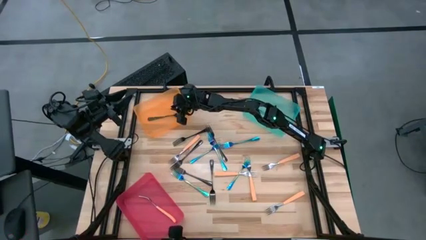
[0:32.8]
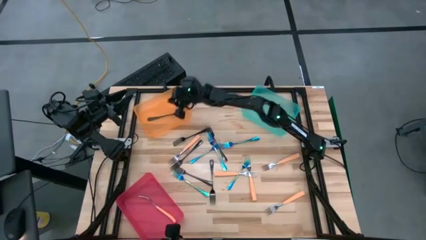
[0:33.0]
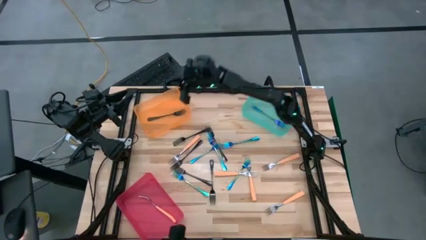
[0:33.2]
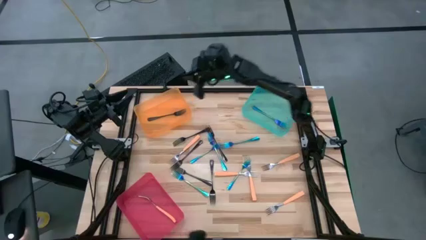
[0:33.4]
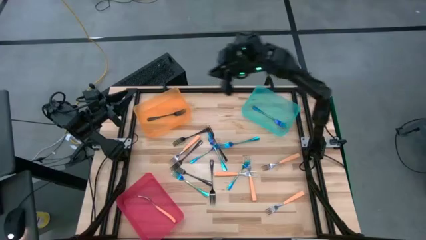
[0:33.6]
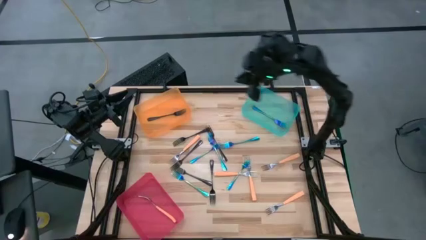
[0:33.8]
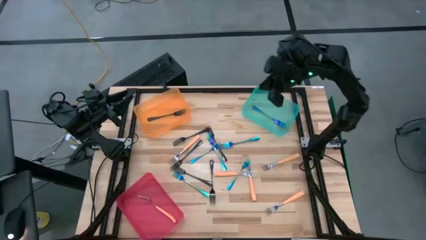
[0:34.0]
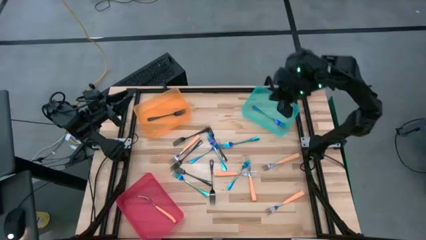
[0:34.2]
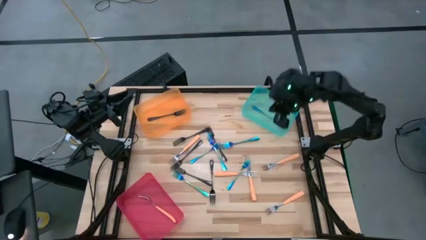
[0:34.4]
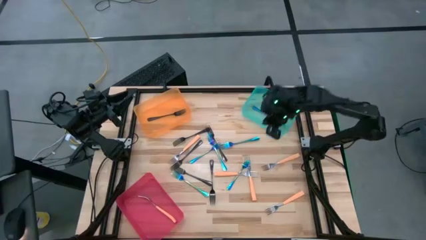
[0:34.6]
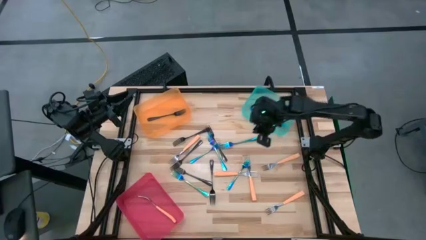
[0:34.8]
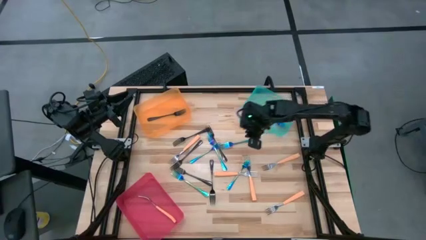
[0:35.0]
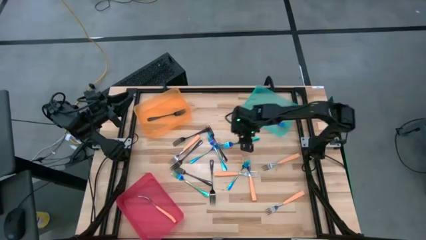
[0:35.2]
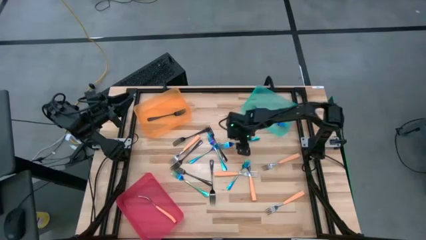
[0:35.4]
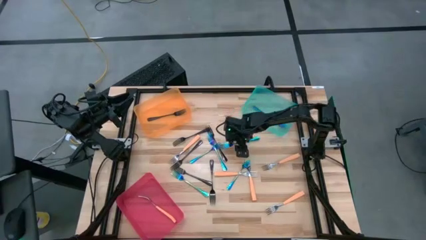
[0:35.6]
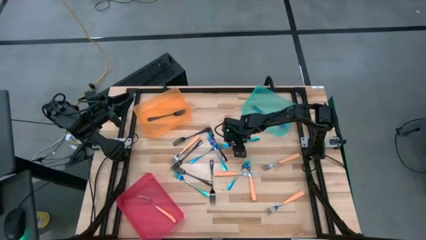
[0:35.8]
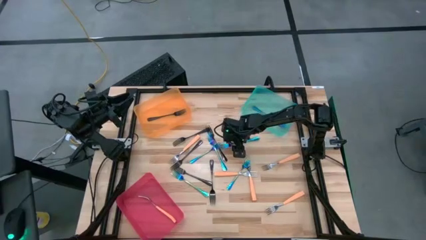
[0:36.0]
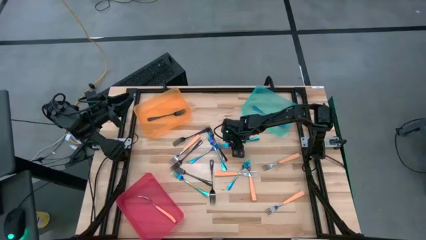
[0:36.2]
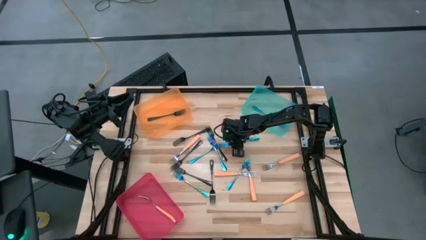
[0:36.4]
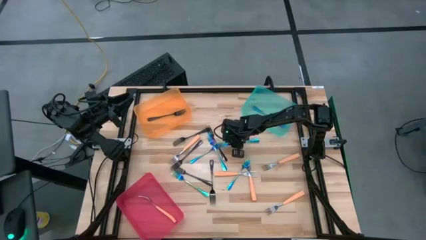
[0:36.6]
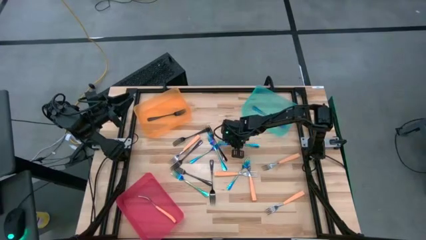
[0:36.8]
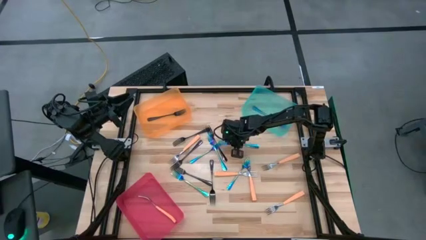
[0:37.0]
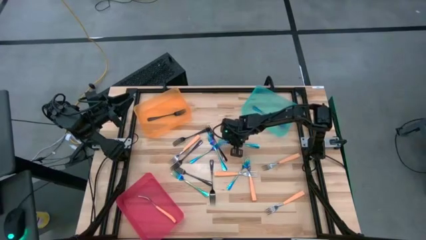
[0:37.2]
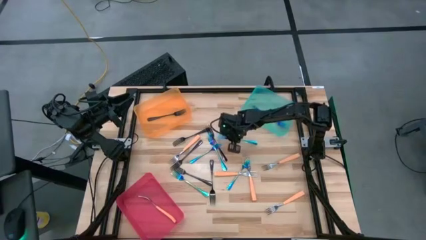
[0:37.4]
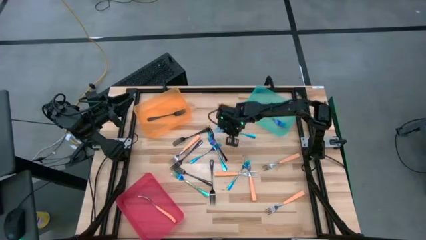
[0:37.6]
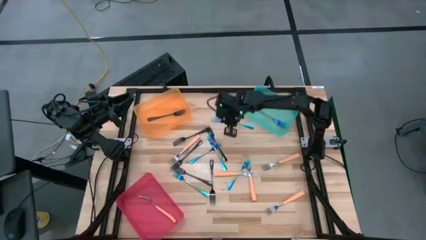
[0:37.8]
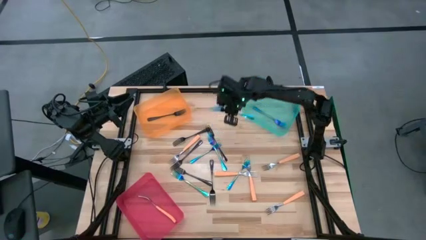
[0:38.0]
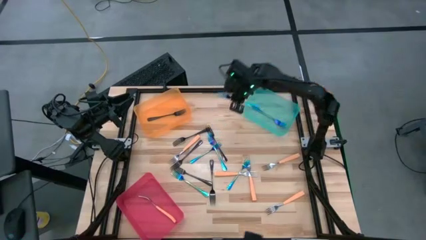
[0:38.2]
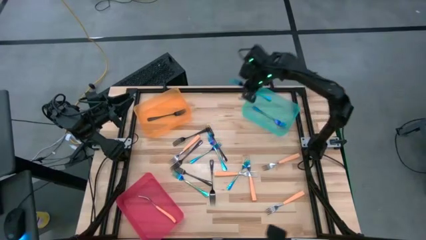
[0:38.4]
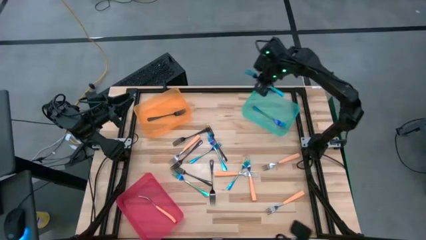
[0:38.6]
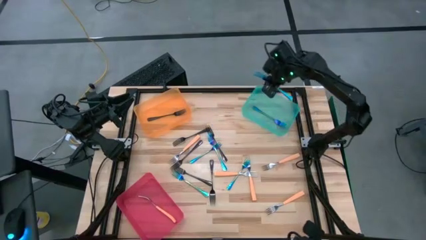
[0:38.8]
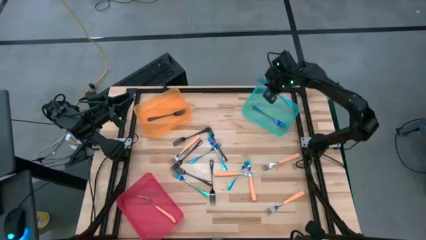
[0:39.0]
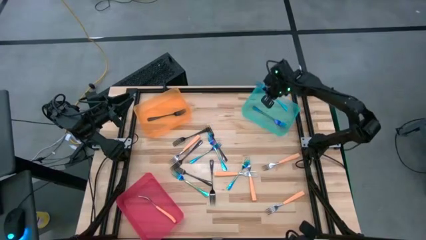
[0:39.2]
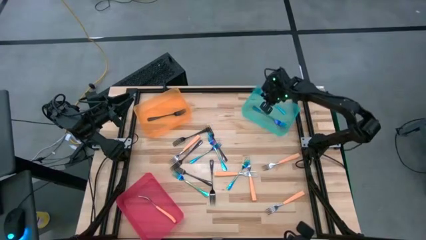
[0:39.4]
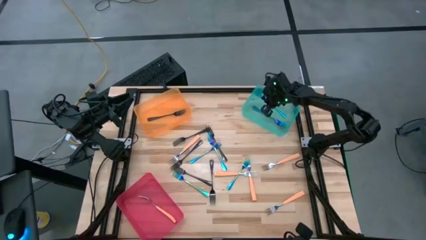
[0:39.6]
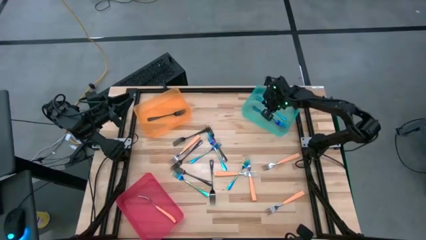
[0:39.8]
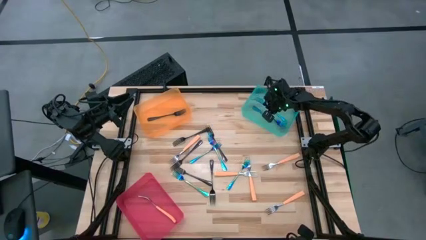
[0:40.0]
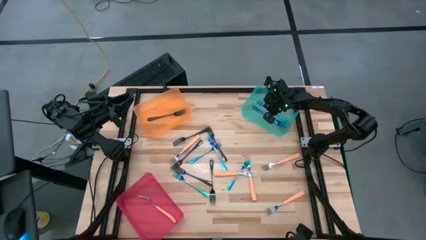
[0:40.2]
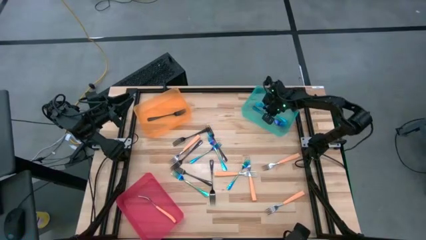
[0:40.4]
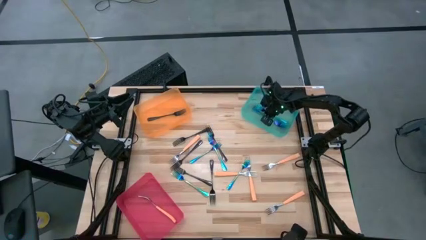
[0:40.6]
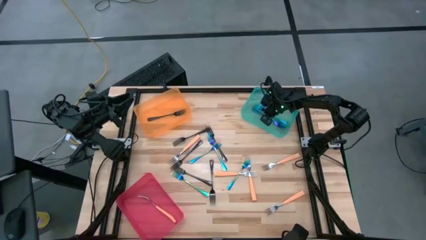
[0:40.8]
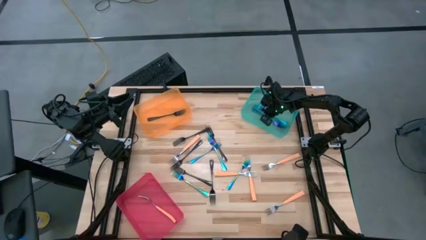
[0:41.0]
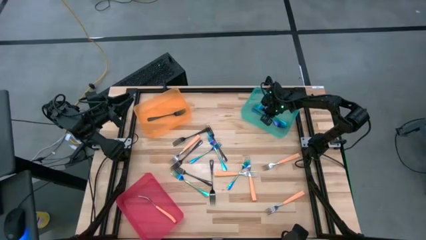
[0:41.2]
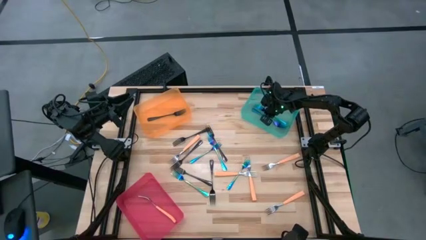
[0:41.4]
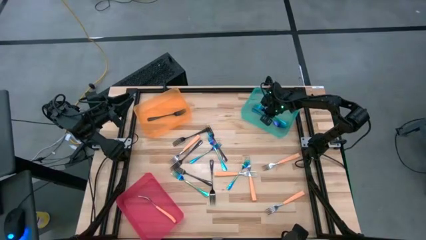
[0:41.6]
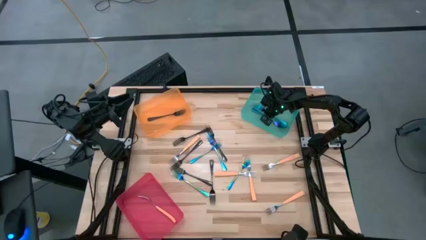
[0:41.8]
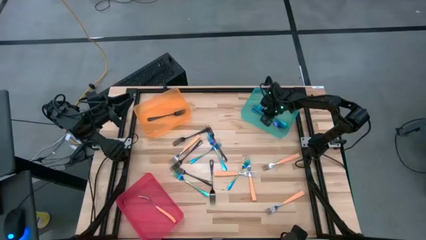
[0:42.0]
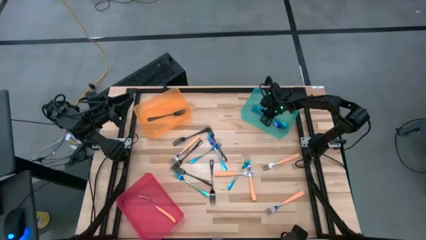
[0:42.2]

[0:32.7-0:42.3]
Task: Sort silverware by color (type)
Put the iridescent fork into the green bin

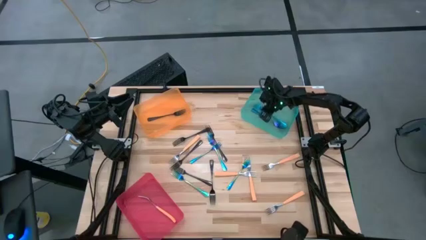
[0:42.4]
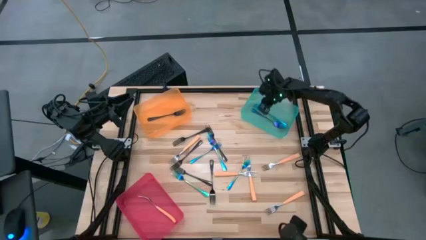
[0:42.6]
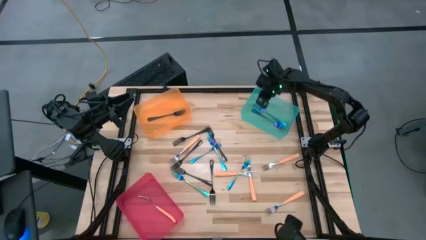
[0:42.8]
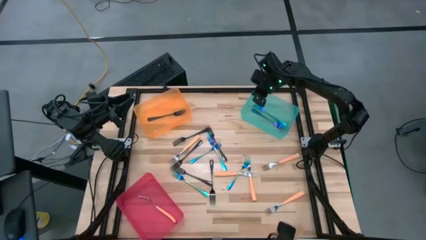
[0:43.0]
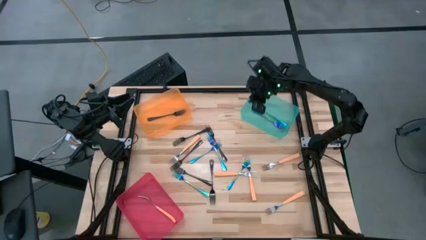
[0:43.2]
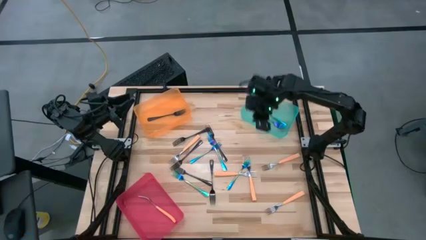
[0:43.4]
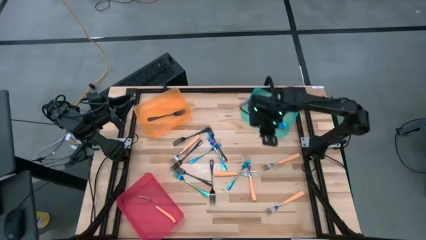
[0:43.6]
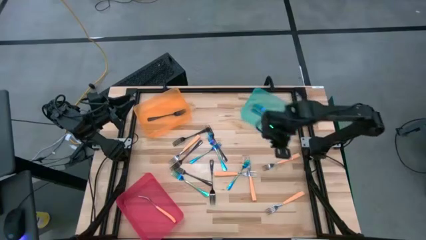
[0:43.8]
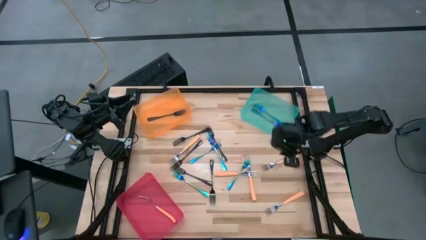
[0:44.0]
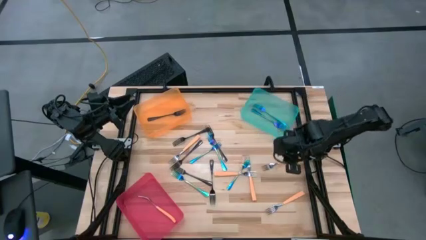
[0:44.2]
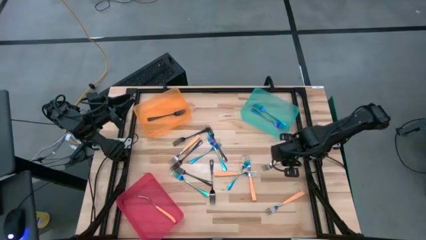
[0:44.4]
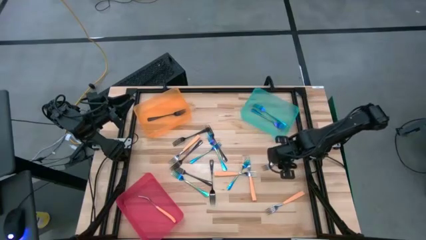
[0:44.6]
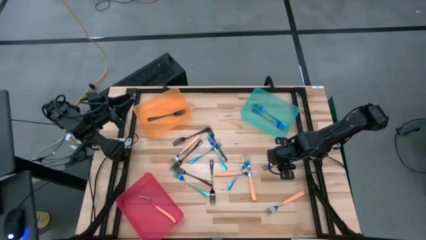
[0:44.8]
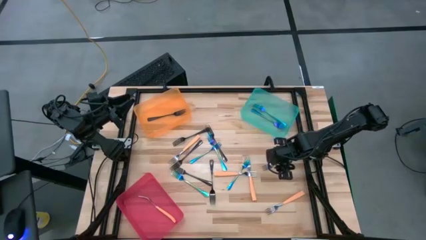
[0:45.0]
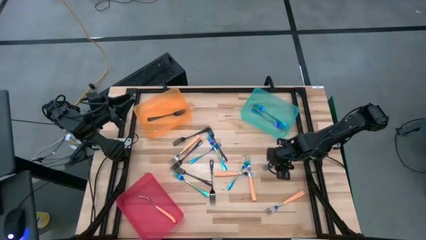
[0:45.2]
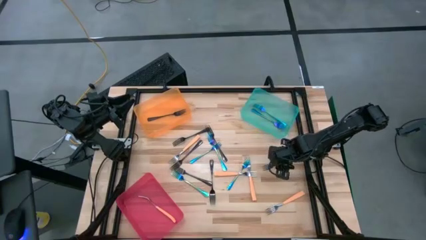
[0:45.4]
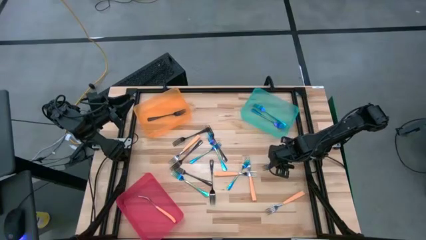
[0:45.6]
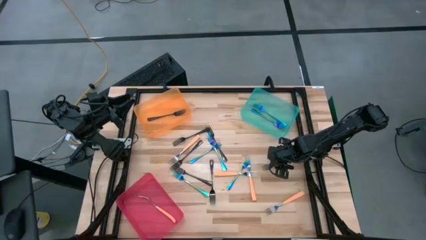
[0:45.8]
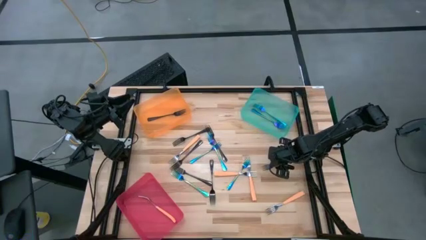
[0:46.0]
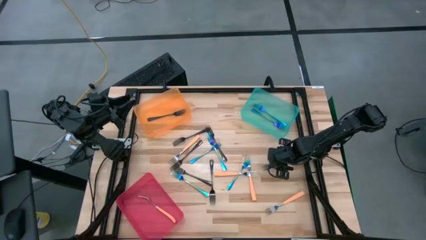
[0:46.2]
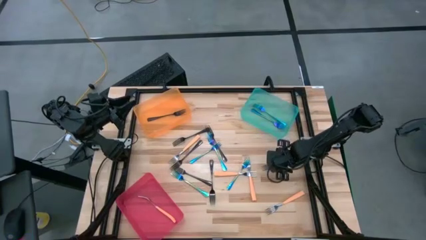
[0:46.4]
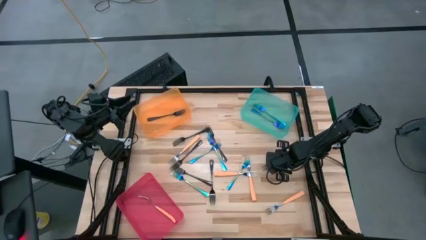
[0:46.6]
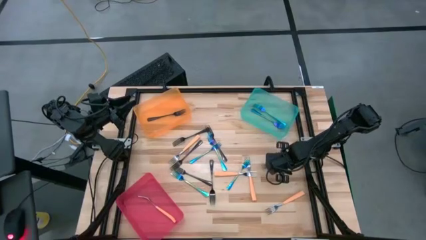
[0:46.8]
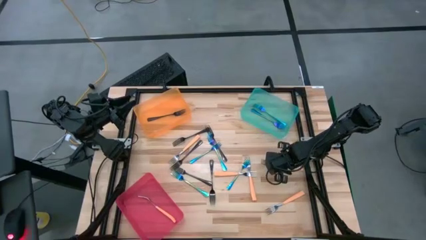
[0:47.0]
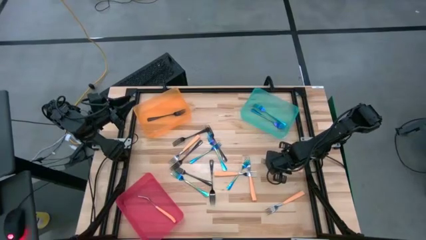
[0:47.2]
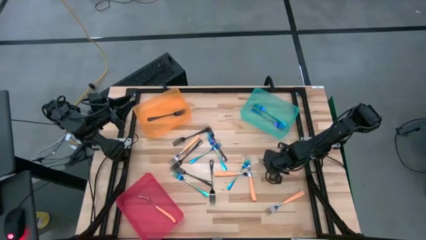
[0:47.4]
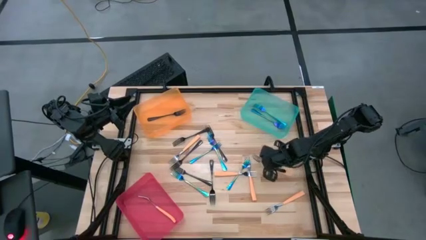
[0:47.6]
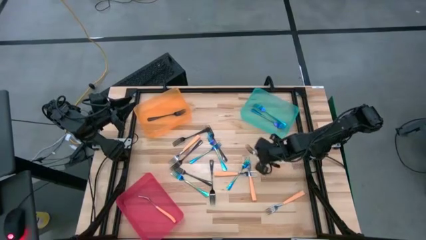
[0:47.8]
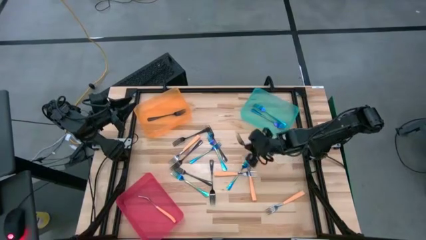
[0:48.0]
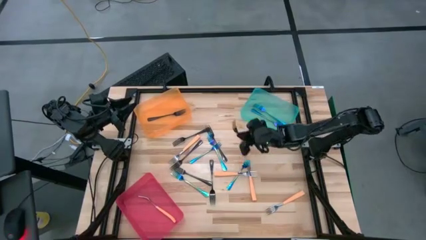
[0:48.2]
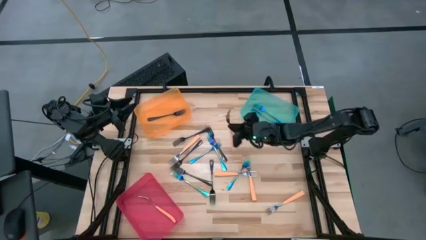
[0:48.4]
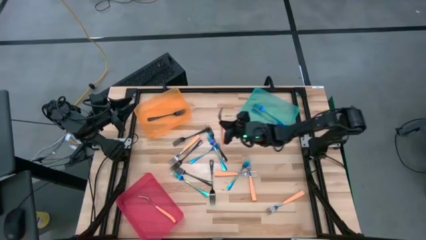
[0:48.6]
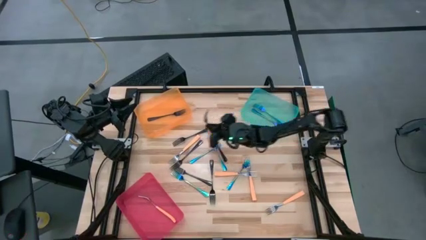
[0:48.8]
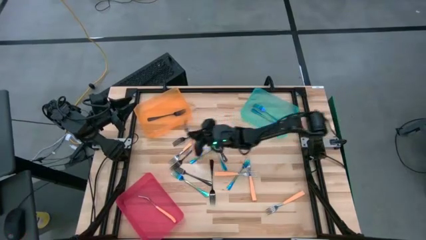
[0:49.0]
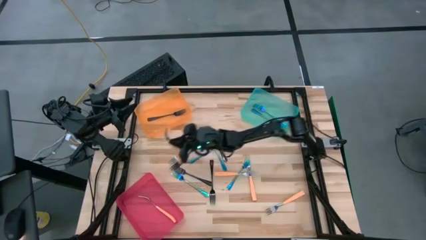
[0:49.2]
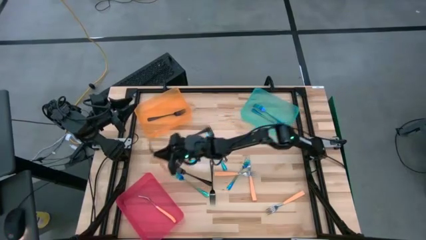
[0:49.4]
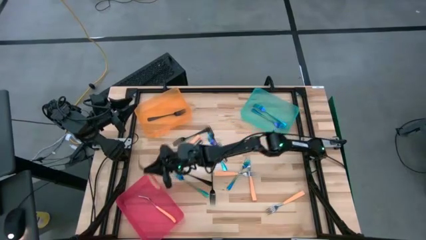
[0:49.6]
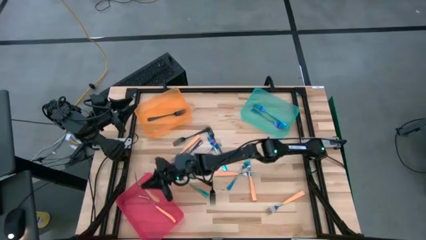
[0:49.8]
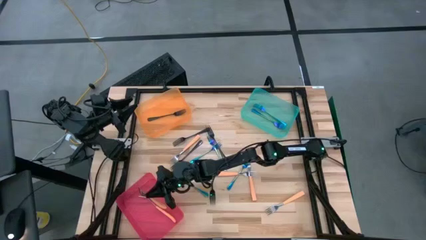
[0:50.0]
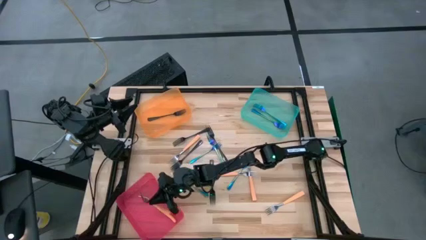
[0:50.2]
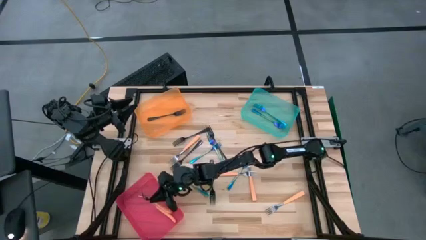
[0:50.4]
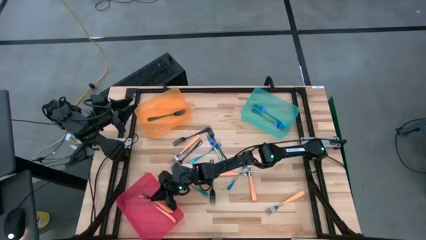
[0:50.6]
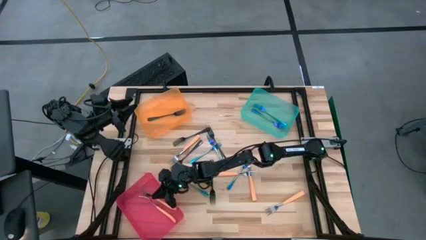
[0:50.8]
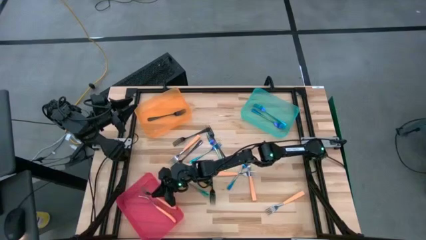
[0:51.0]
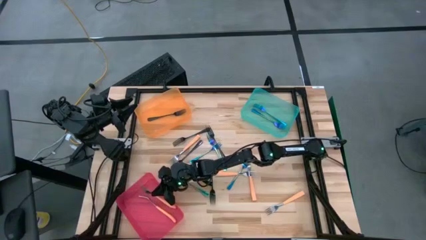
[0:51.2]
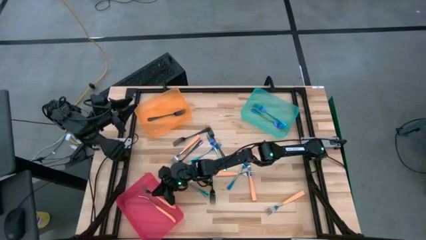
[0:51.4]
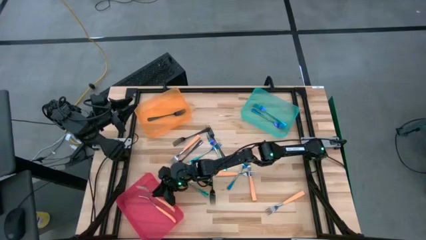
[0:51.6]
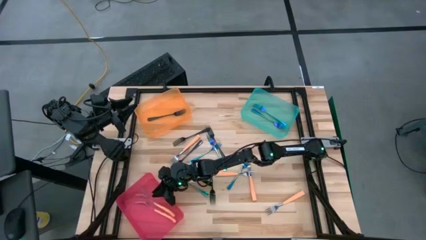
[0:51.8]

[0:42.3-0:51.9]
Put the orange fork into the pink bin
